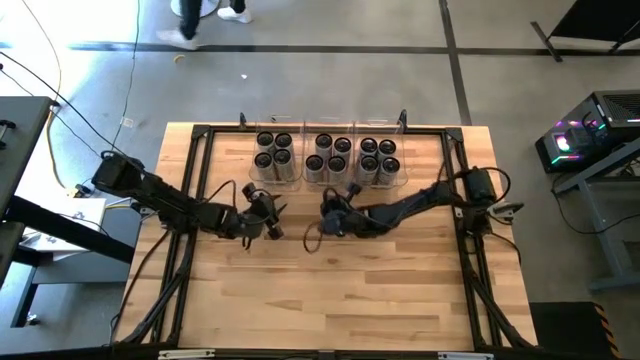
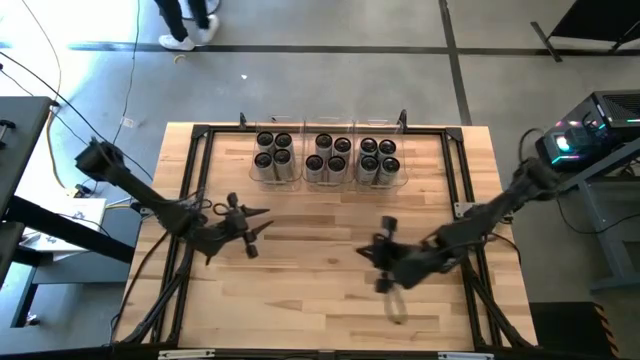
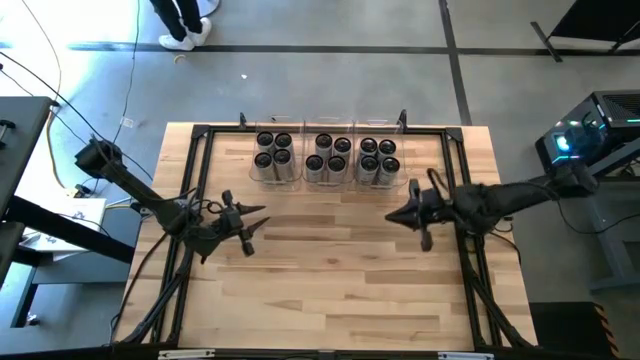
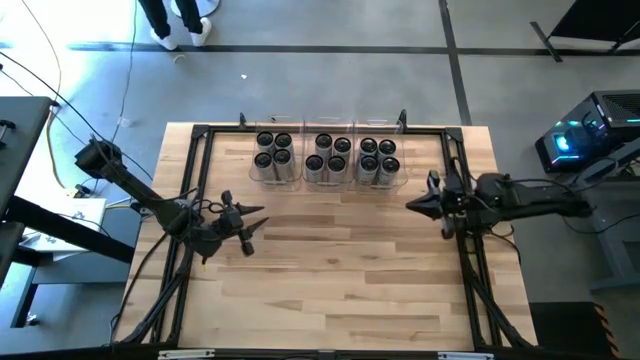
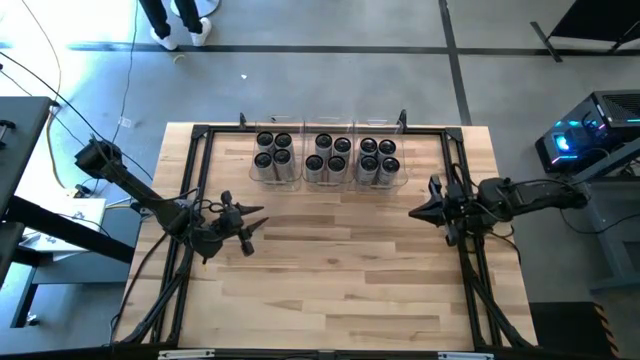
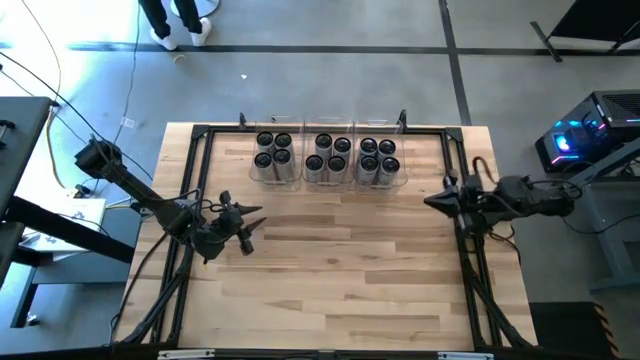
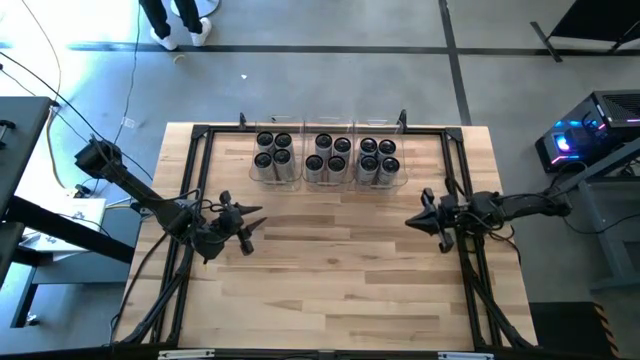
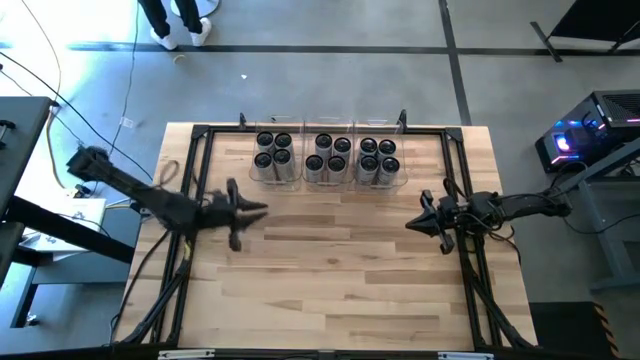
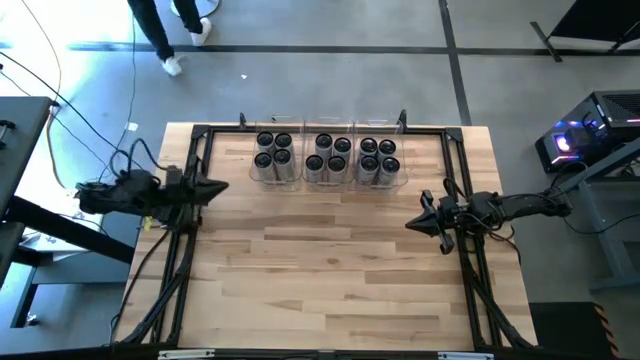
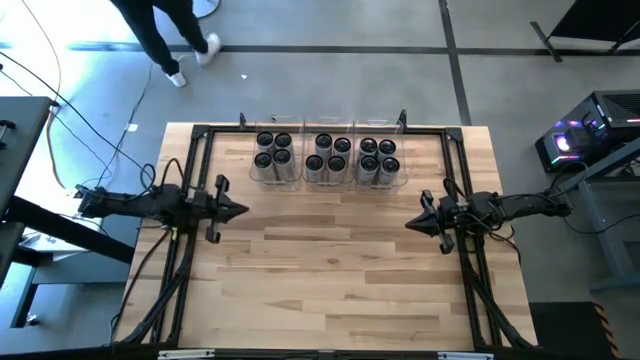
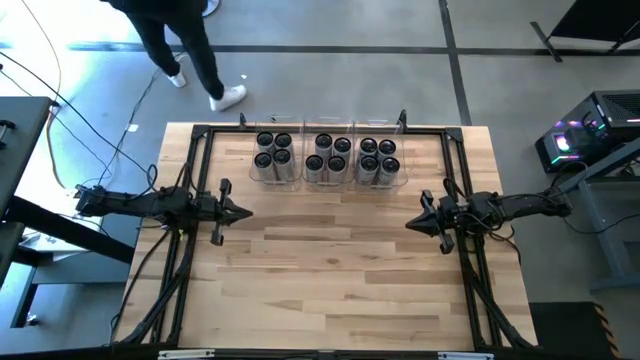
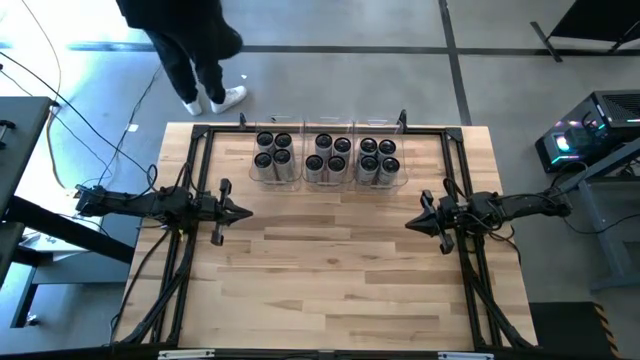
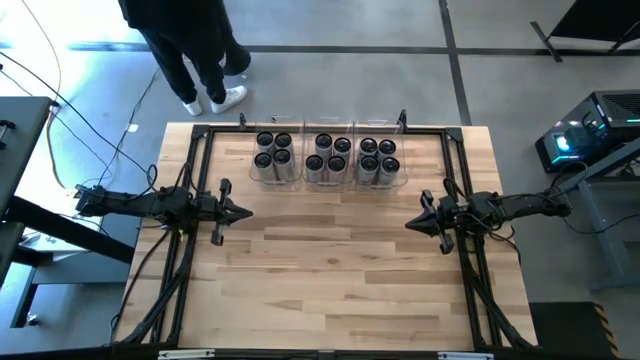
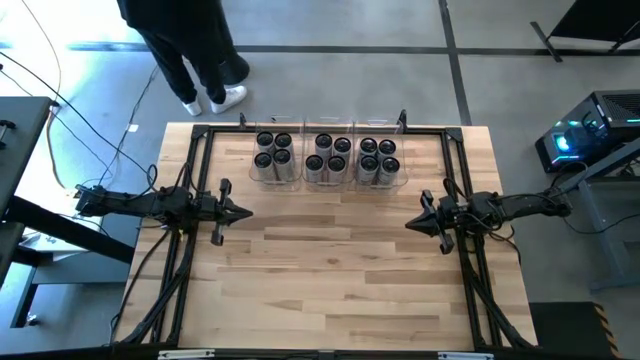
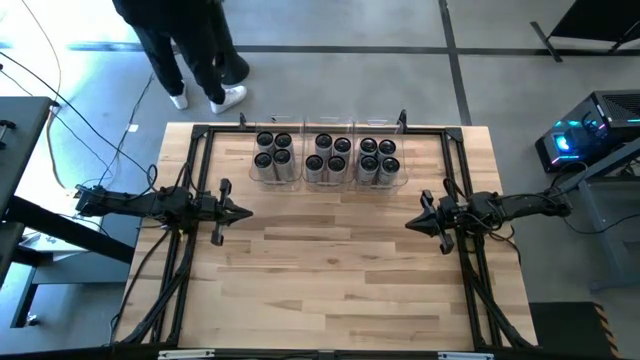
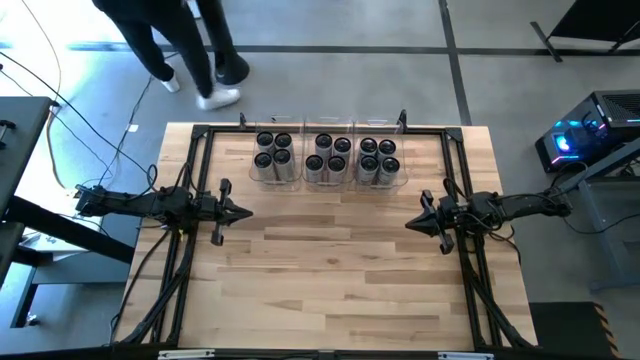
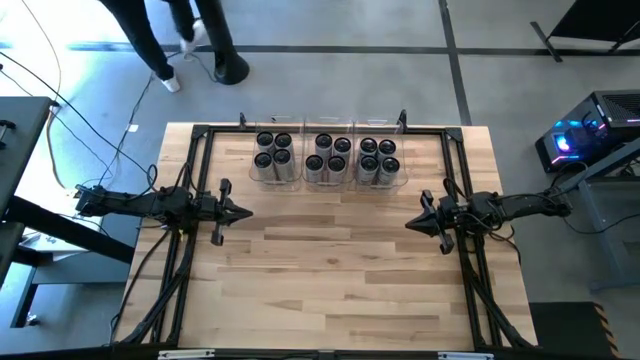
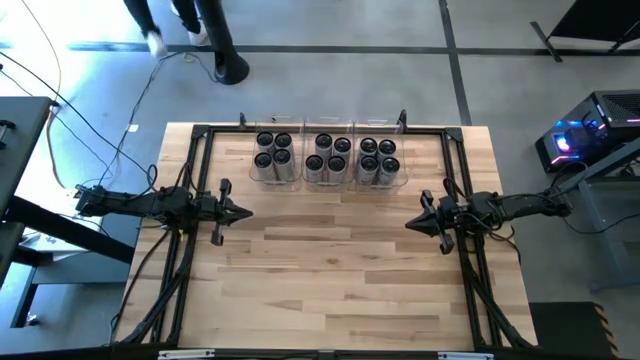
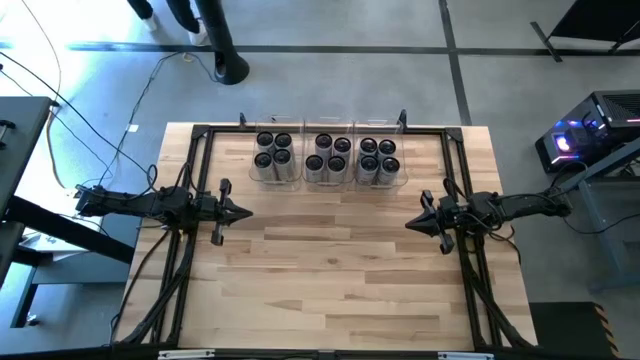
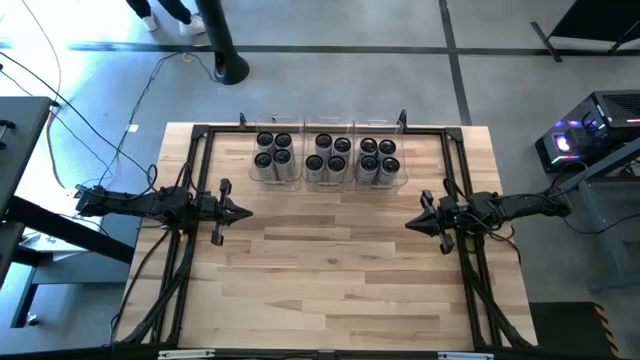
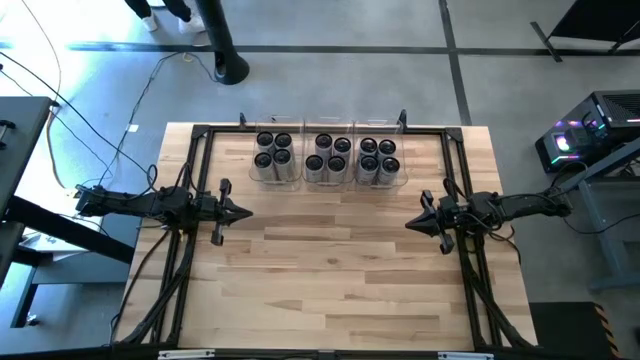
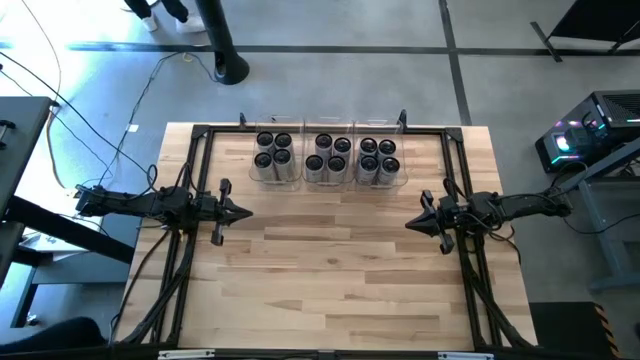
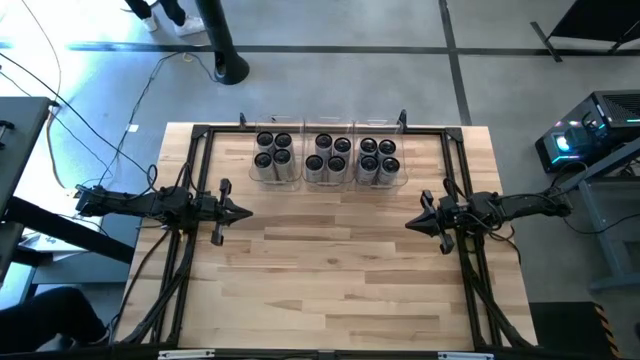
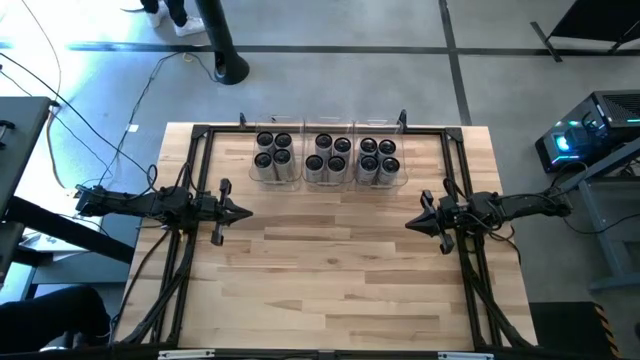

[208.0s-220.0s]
Task: Sort soda cans
Return to Home Position

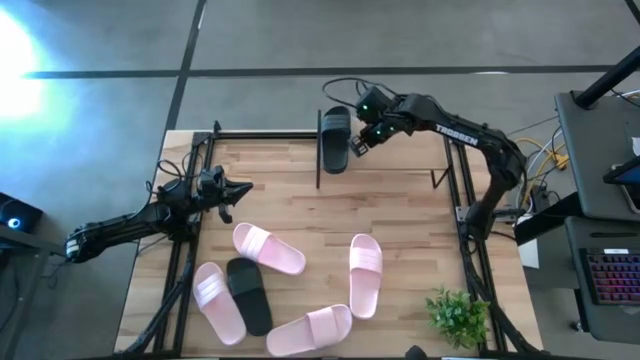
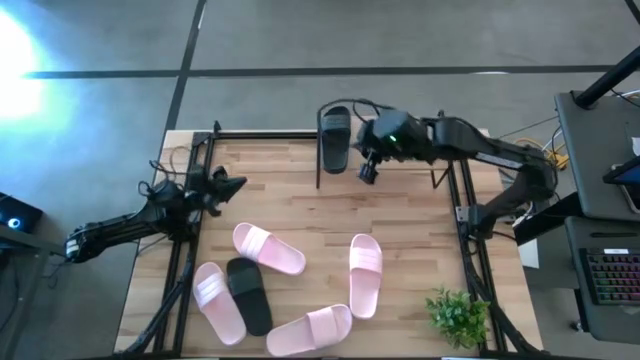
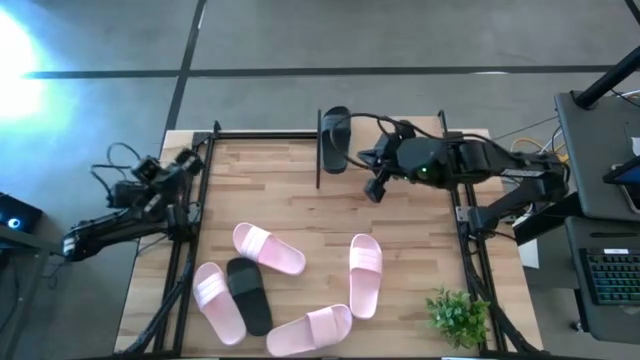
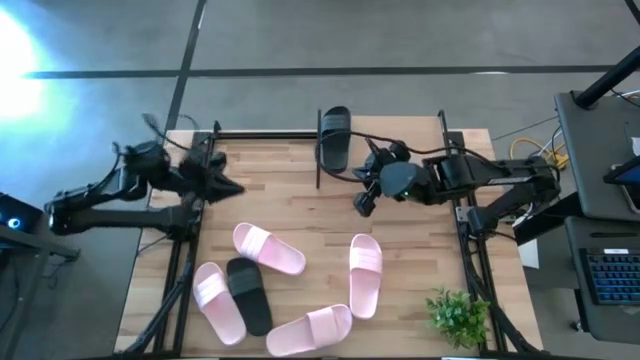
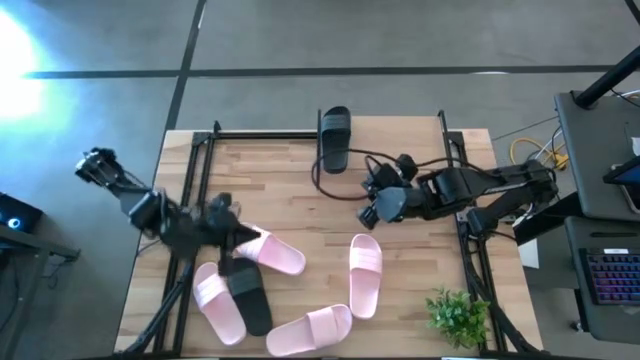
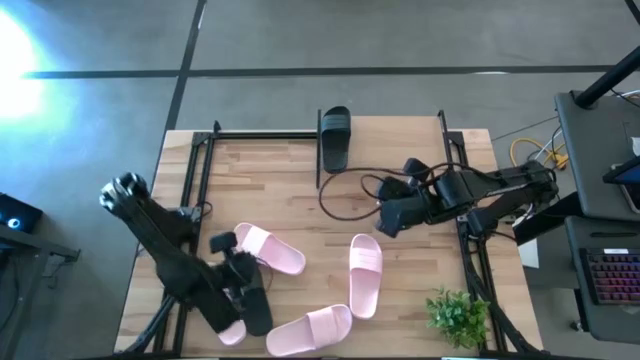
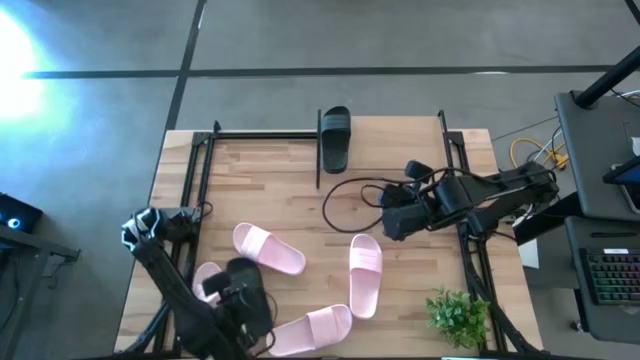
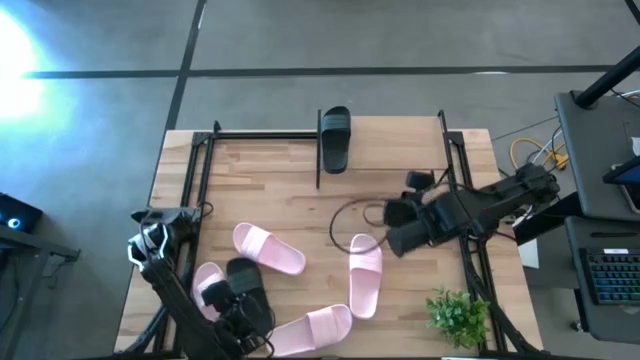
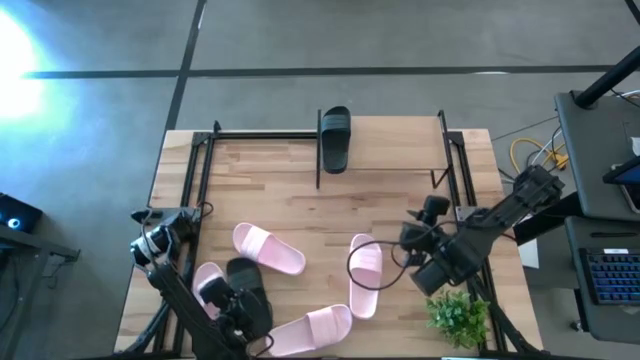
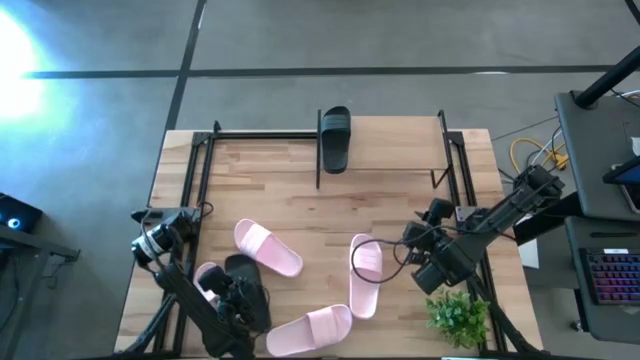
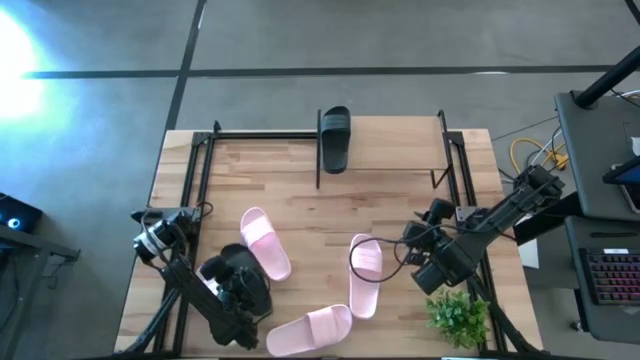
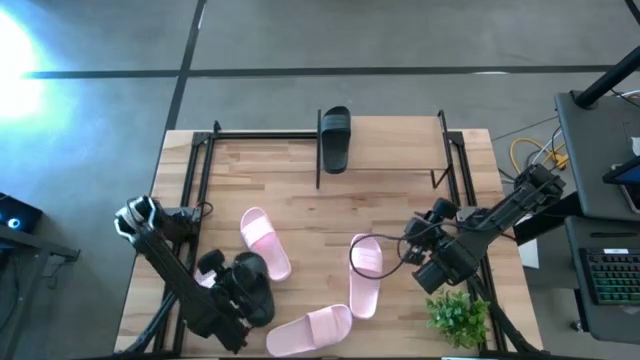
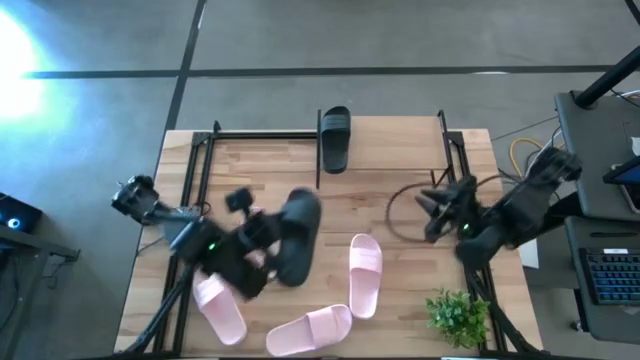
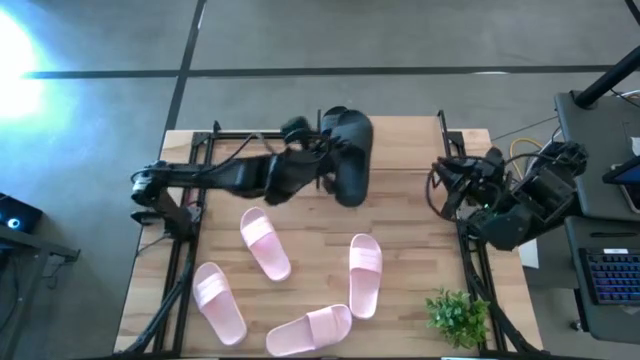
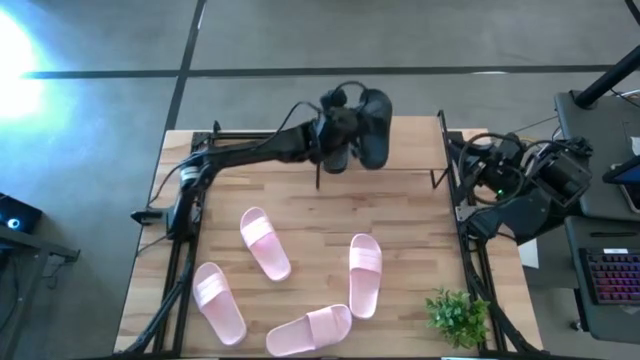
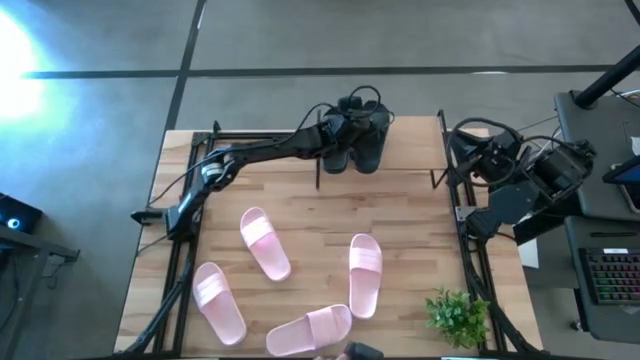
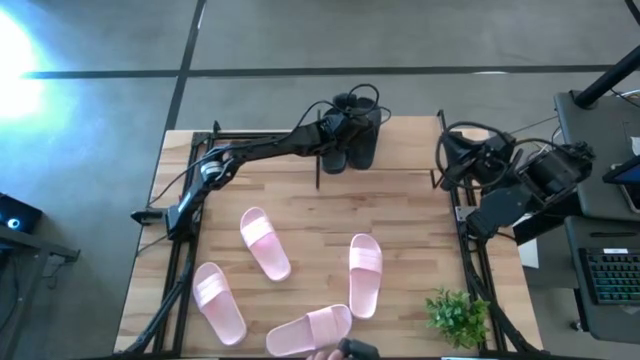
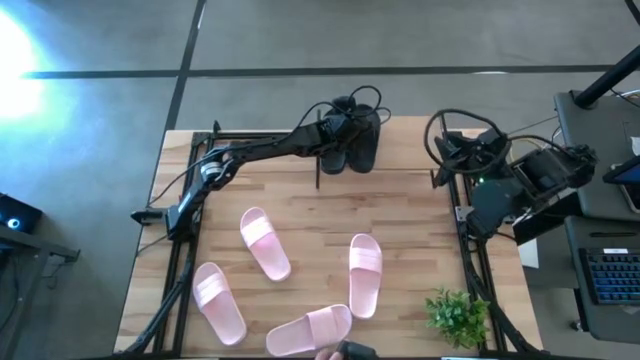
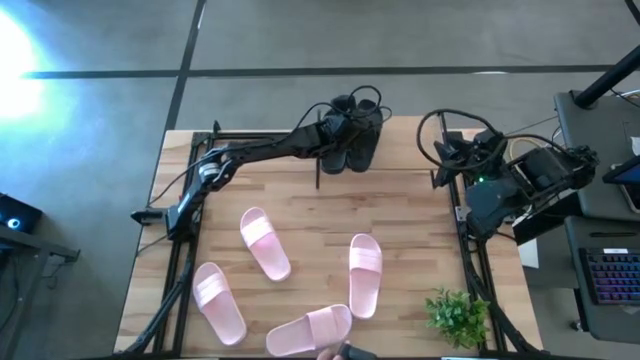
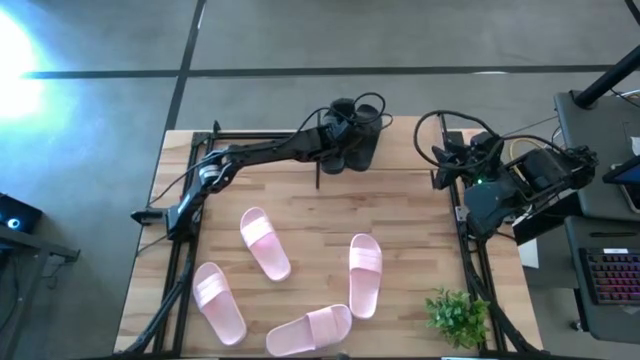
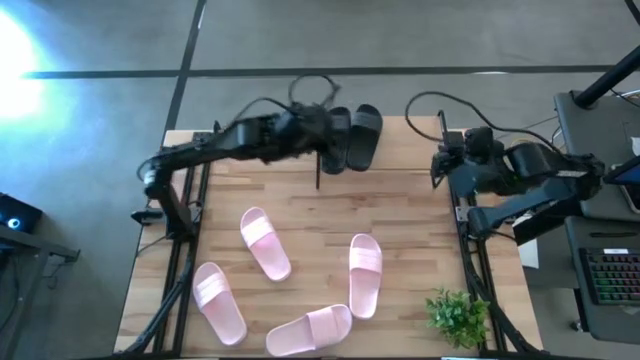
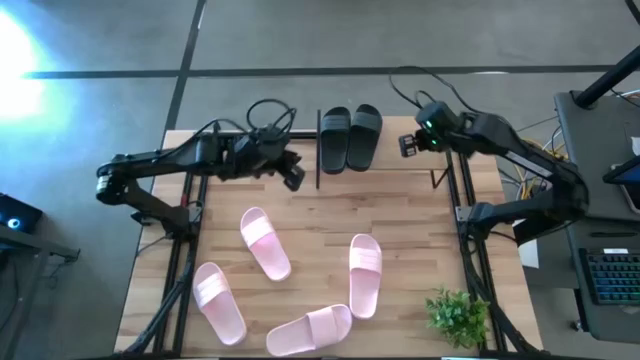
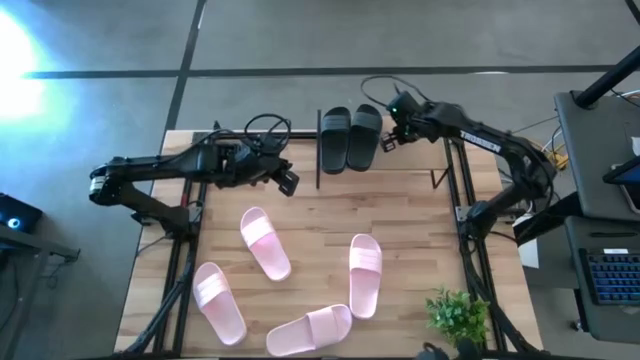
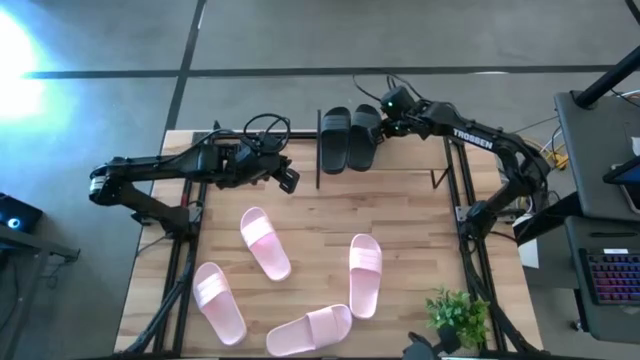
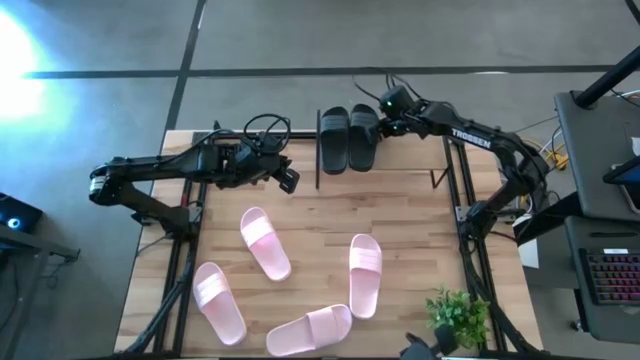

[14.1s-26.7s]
Task: Pick and place slides into the shelf
Put the black slide on the shelf
